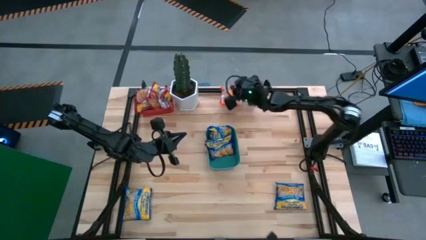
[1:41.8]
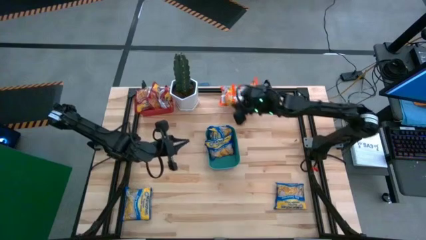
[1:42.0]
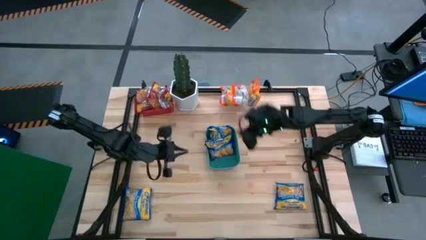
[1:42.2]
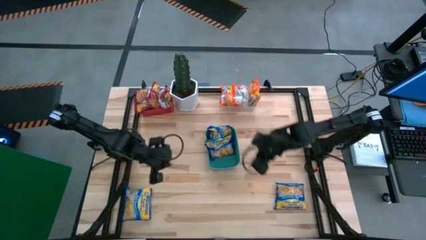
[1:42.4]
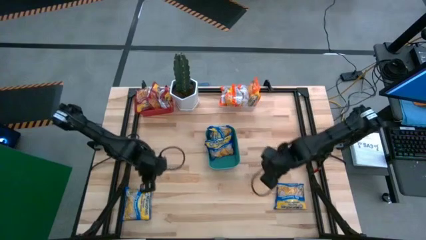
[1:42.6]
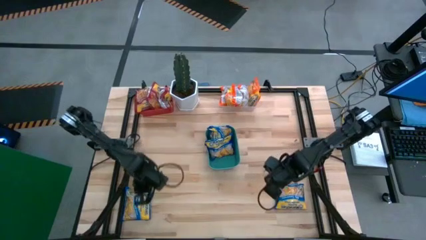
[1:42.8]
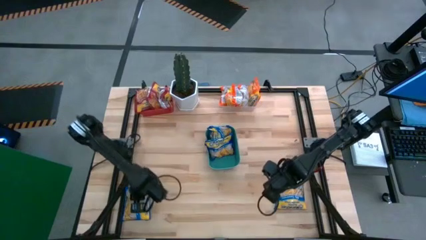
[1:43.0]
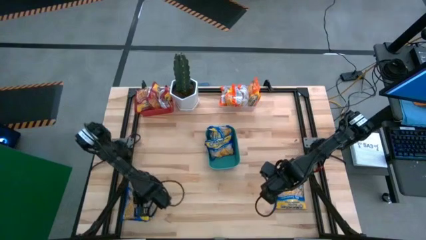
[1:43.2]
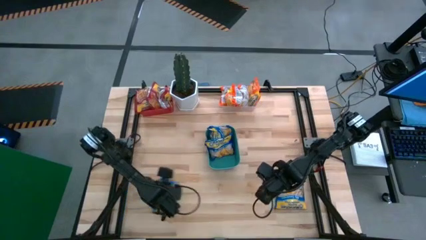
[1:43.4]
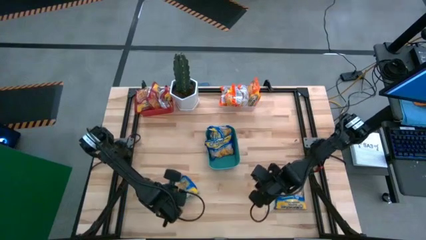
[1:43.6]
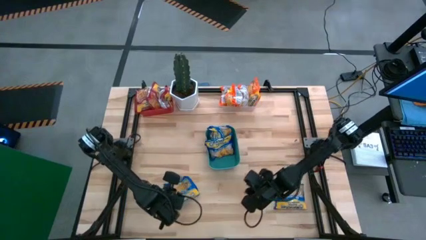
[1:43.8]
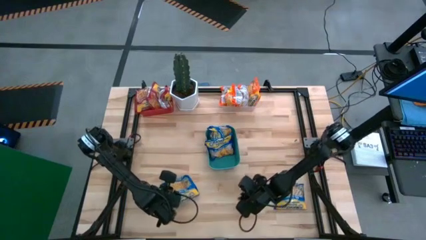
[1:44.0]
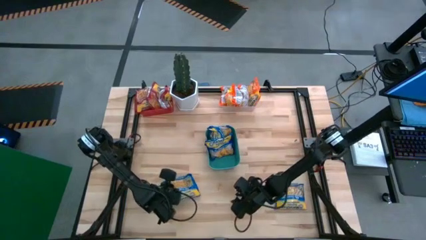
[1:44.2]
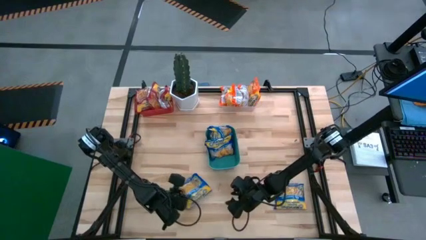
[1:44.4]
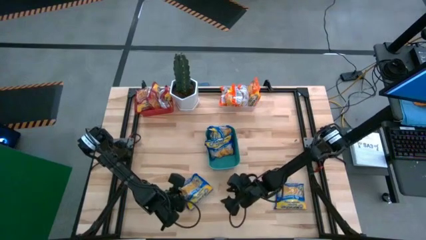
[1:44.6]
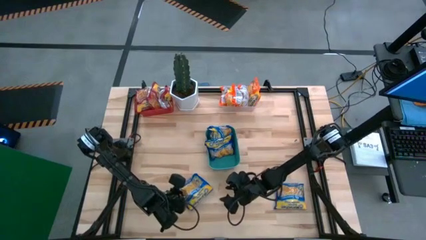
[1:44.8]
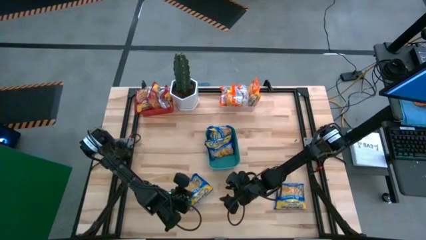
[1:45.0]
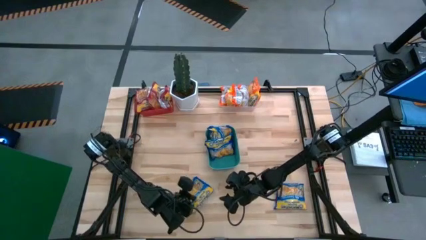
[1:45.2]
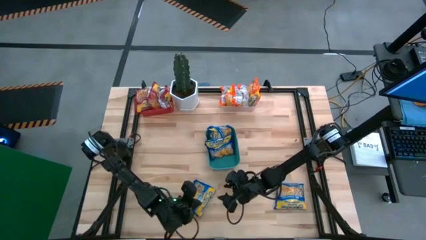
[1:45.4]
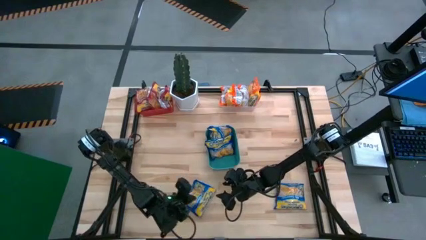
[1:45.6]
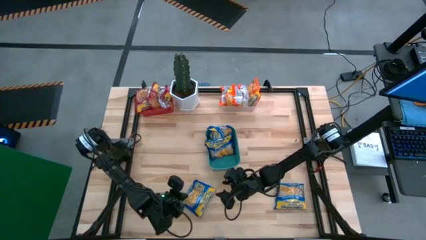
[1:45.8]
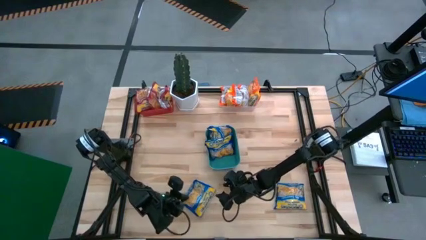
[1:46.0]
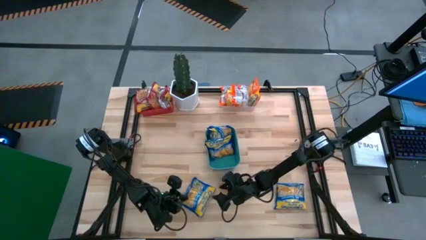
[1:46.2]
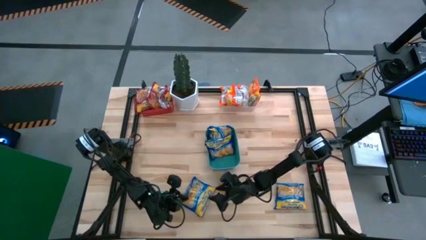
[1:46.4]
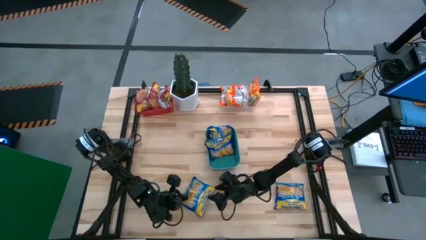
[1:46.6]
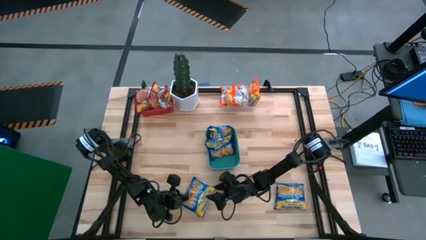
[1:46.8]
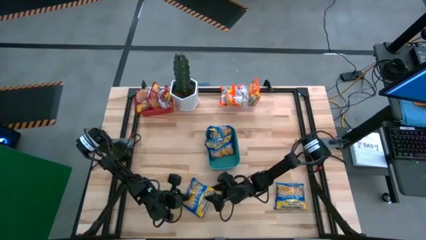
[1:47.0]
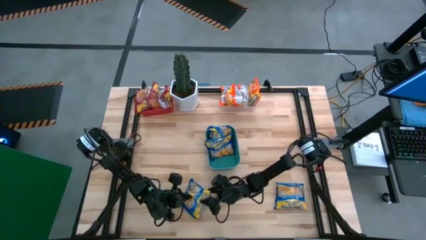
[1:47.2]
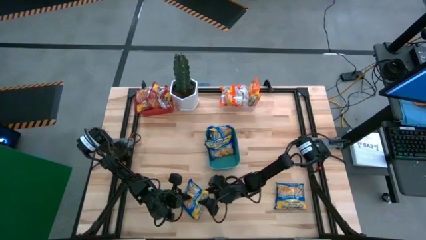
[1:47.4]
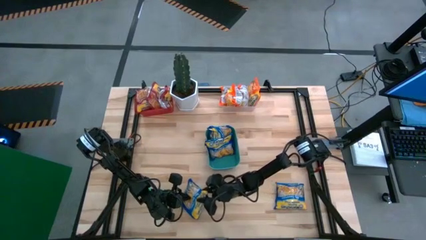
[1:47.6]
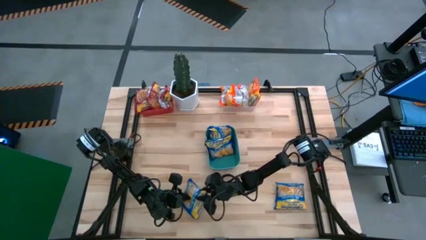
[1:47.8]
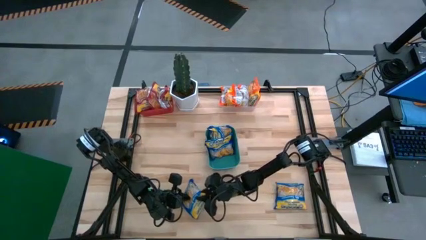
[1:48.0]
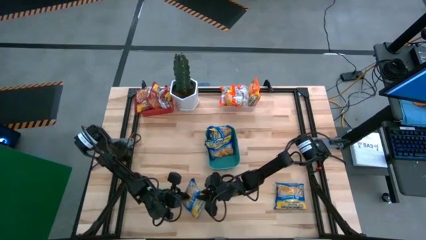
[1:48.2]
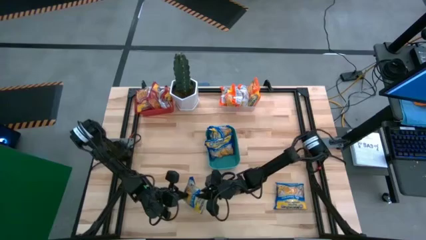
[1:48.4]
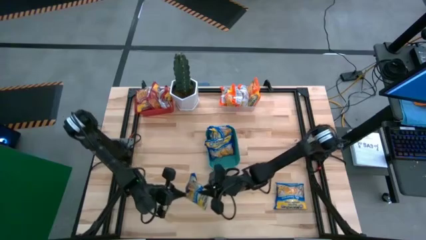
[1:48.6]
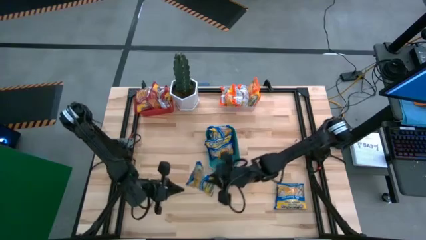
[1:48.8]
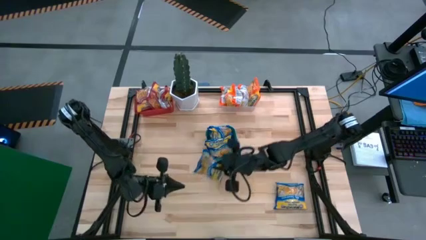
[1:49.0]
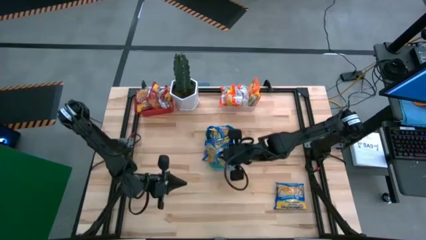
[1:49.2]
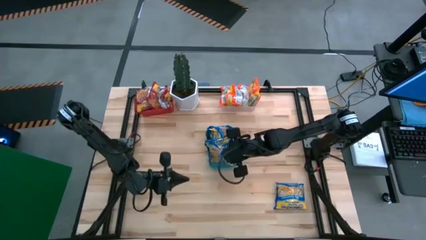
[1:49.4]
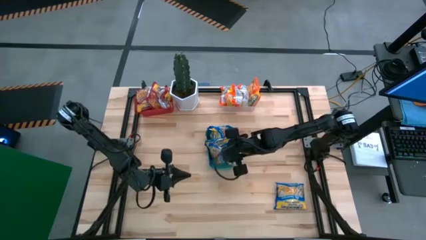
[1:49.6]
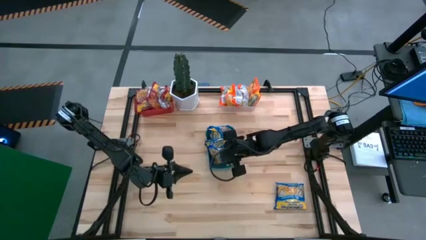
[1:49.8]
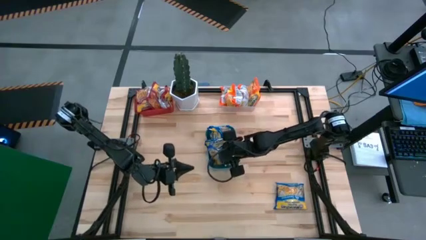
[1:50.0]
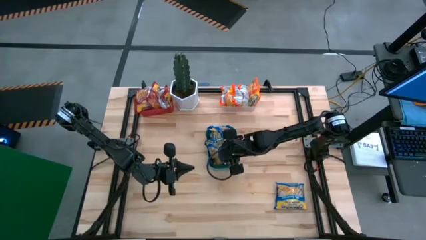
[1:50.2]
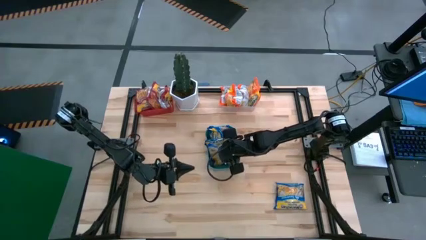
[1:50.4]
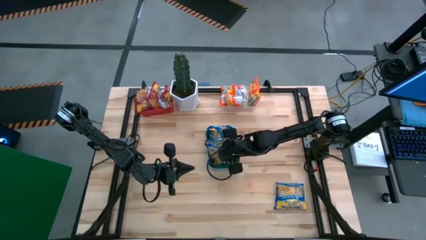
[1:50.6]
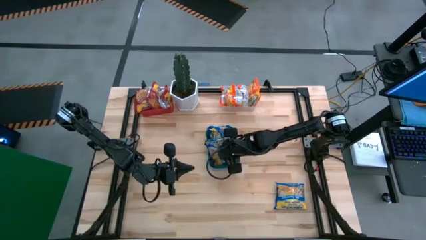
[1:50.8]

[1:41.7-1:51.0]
Task: Sort Maruchan noodles
Put the blue noodle pack into the green bin

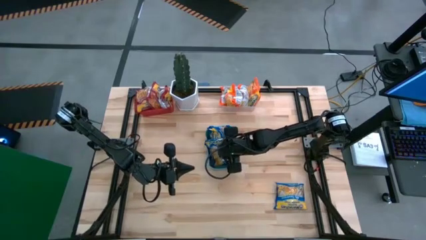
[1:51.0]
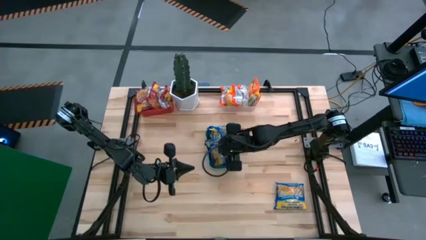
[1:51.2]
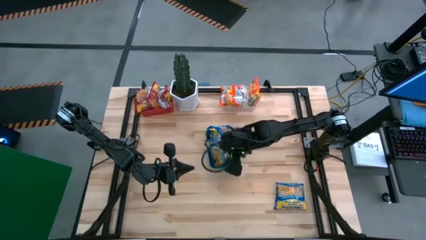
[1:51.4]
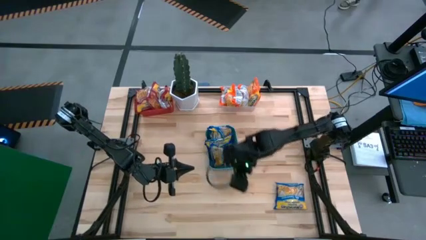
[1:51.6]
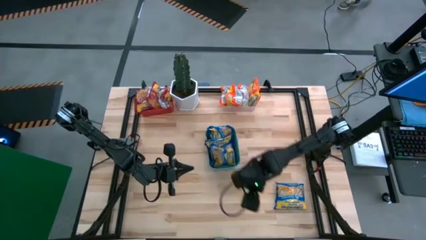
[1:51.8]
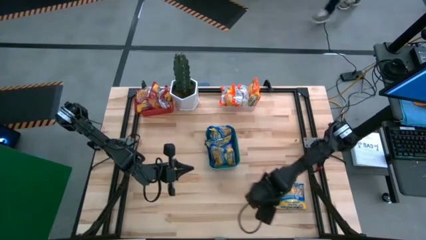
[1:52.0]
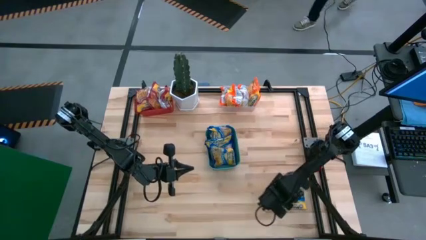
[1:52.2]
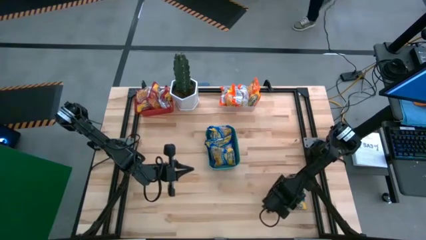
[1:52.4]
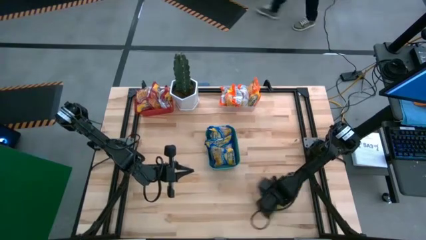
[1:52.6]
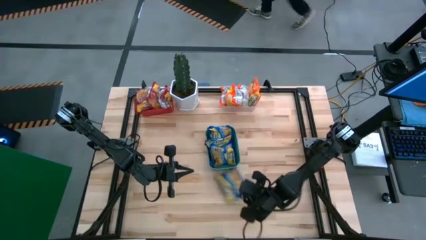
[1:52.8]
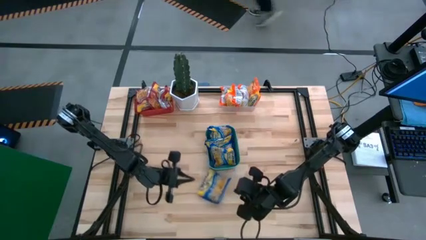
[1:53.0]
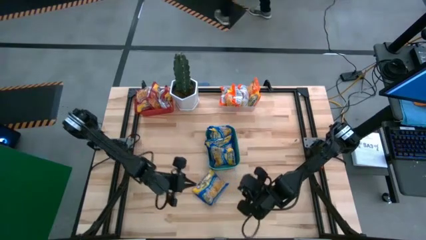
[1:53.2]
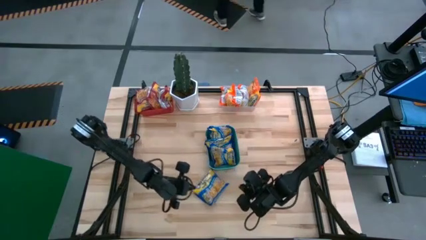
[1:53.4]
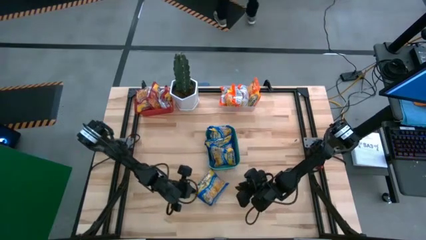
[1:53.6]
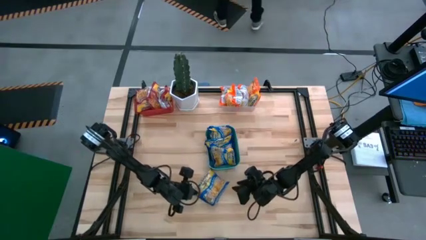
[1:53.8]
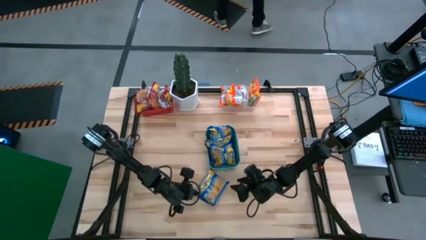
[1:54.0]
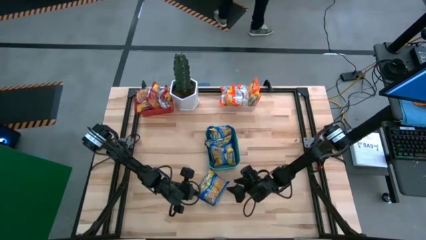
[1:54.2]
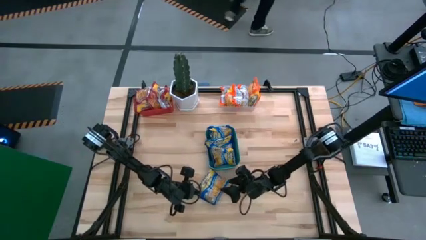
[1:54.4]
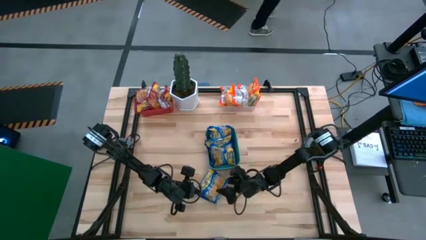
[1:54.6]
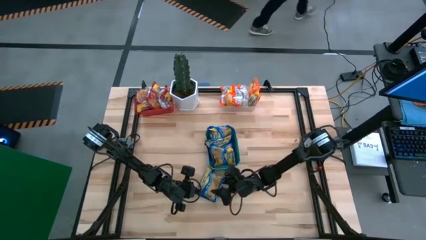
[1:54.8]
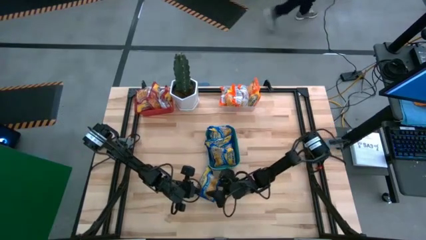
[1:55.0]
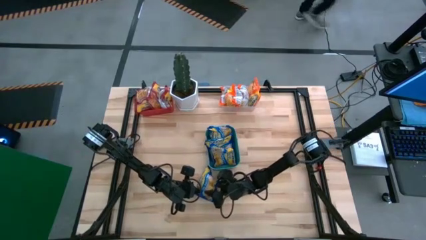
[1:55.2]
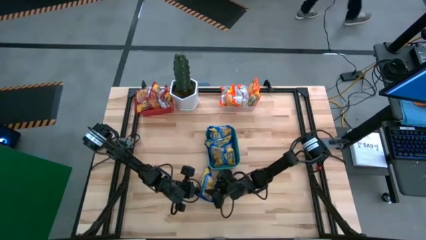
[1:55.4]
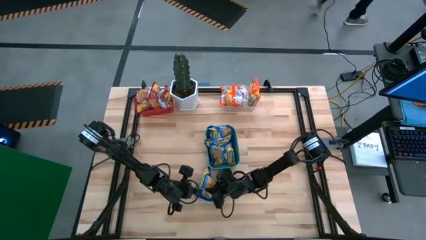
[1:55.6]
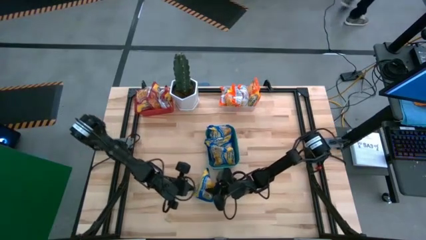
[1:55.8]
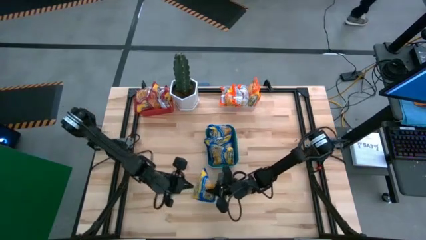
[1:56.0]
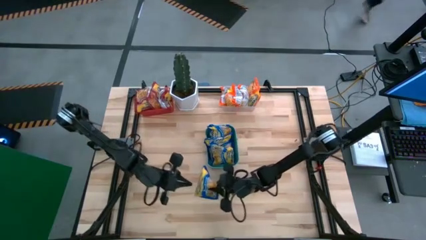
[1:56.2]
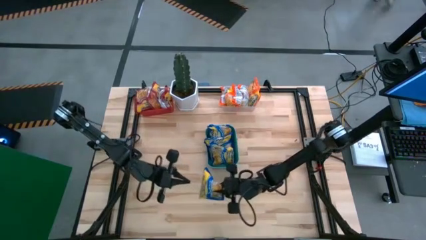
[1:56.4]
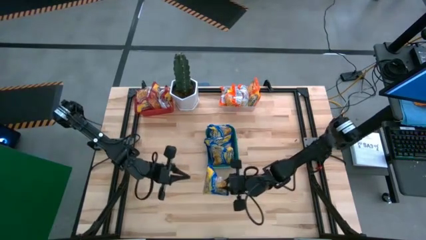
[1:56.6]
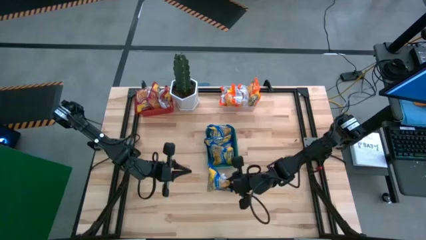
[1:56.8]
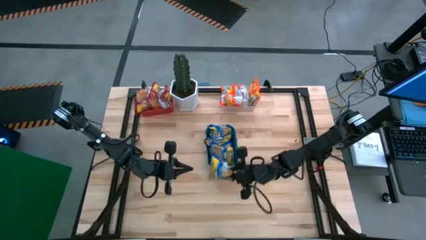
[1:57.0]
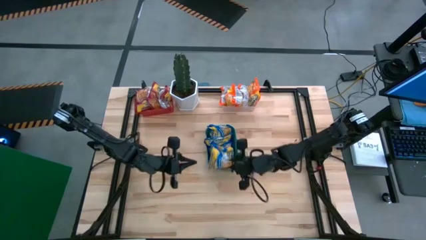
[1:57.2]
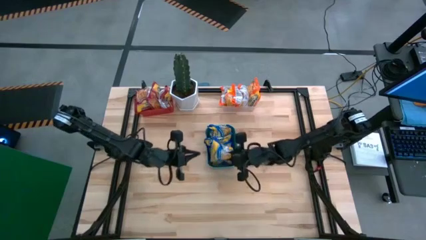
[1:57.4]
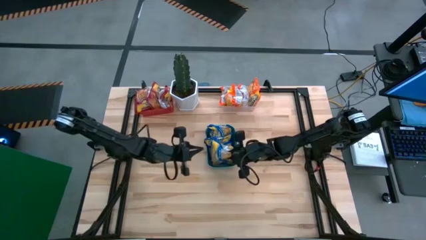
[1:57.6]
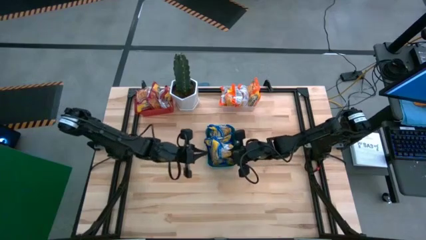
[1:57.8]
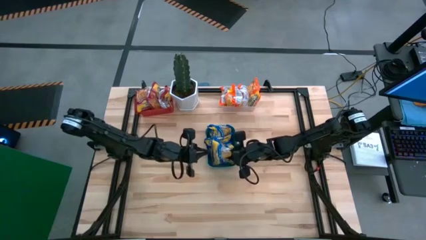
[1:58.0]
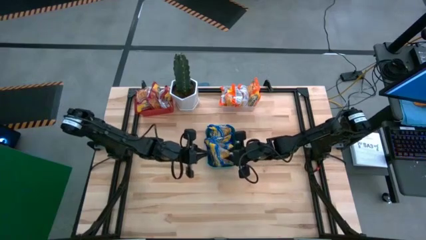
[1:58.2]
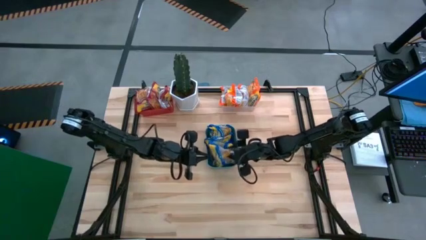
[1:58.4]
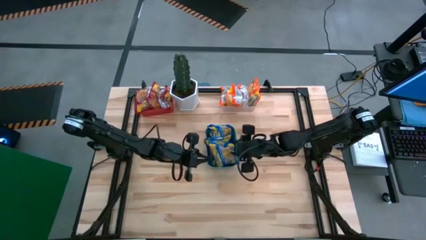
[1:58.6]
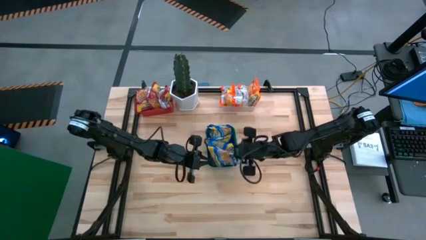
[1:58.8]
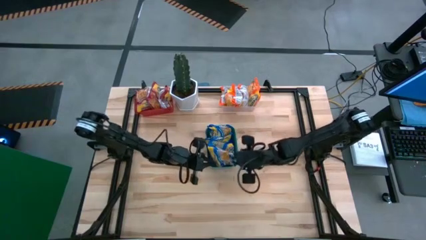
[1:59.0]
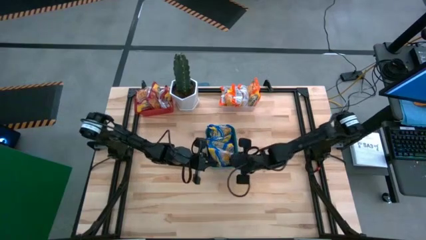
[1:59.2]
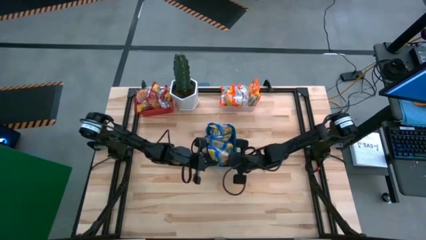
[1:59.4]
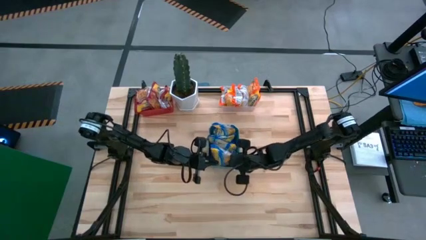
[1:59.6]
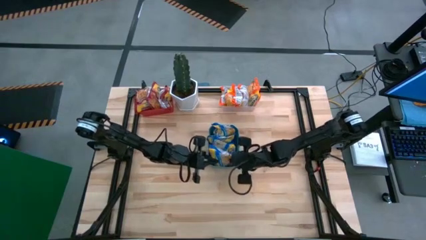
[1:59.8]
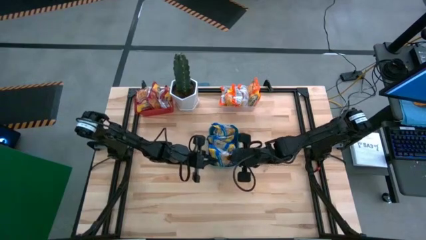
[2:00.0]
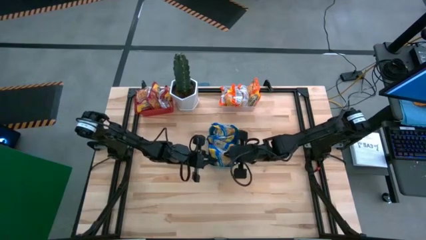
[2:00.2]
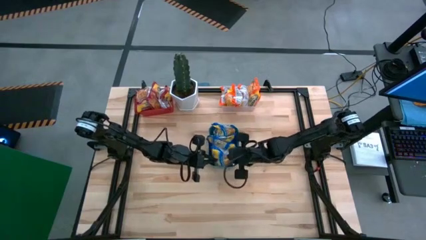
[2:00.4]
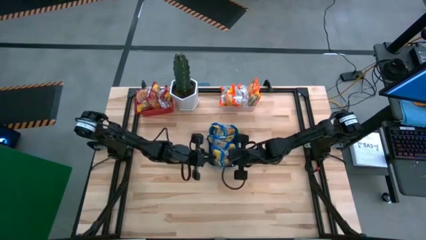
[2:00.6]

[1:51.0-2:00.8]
Put the blue noodle pack into the green bin
